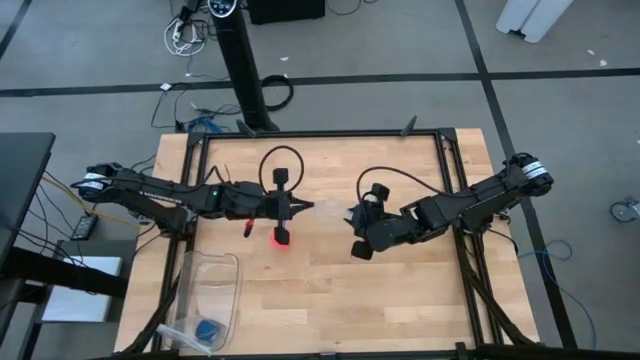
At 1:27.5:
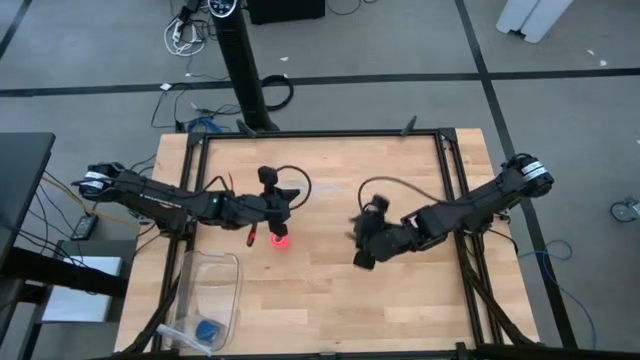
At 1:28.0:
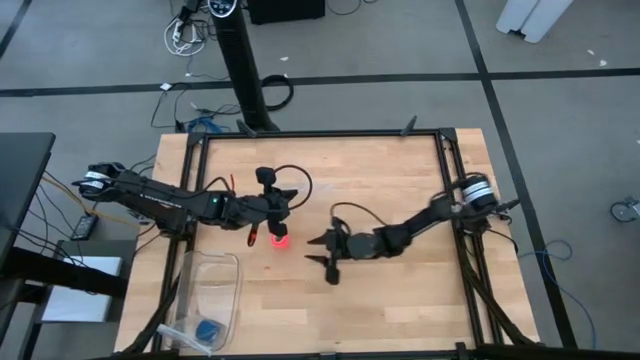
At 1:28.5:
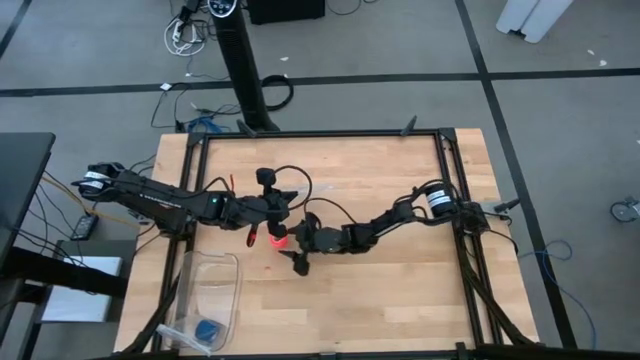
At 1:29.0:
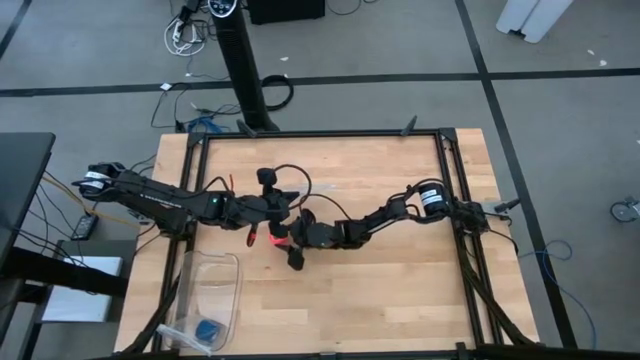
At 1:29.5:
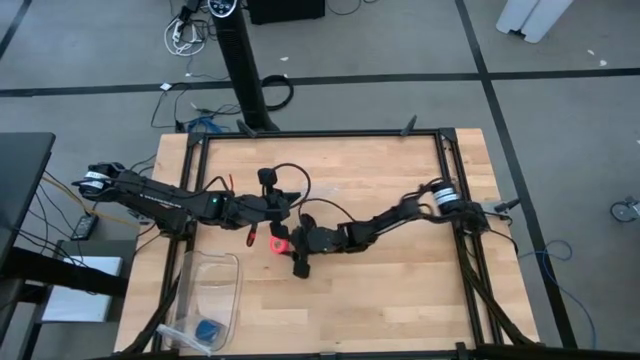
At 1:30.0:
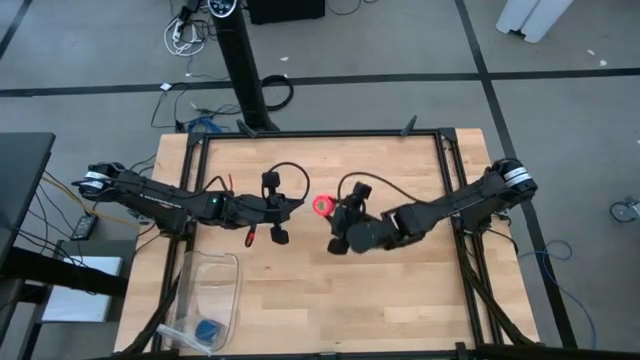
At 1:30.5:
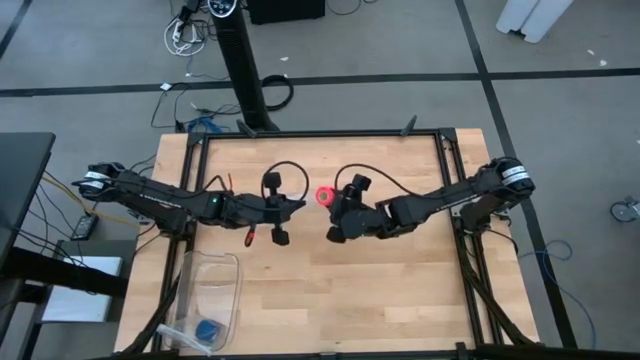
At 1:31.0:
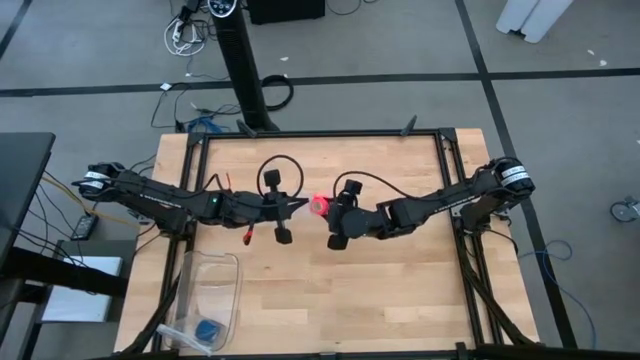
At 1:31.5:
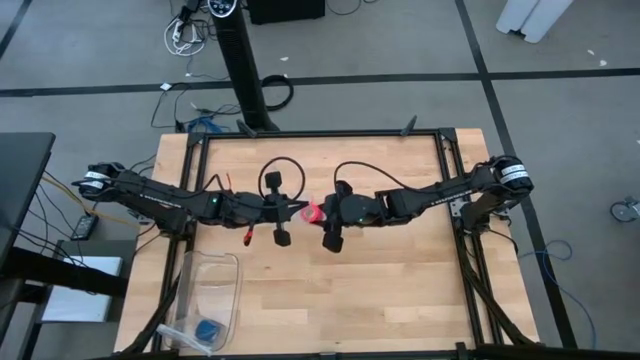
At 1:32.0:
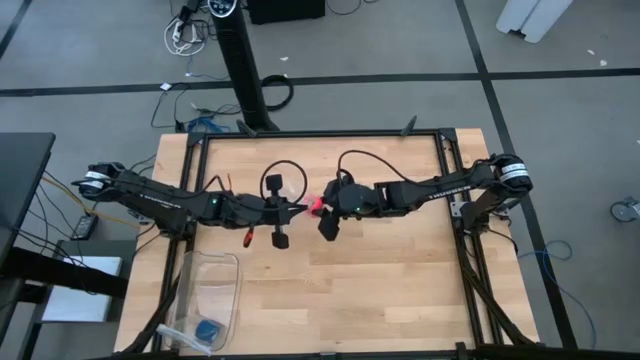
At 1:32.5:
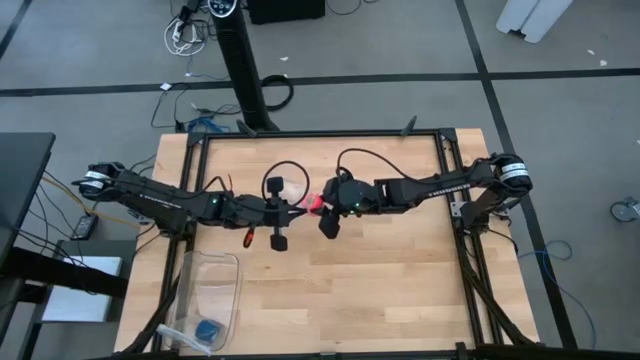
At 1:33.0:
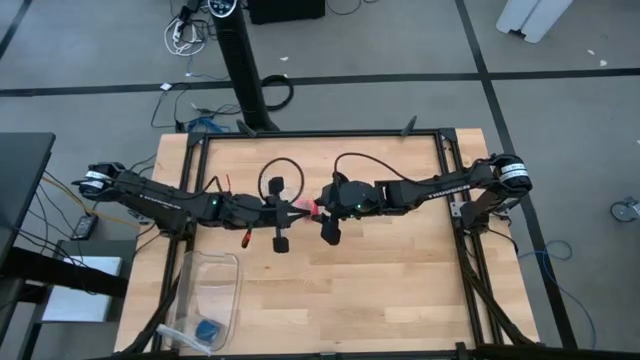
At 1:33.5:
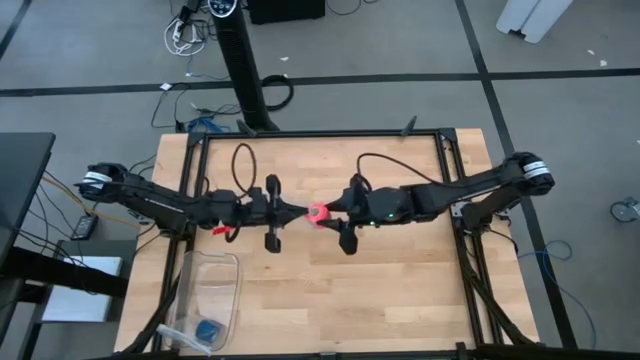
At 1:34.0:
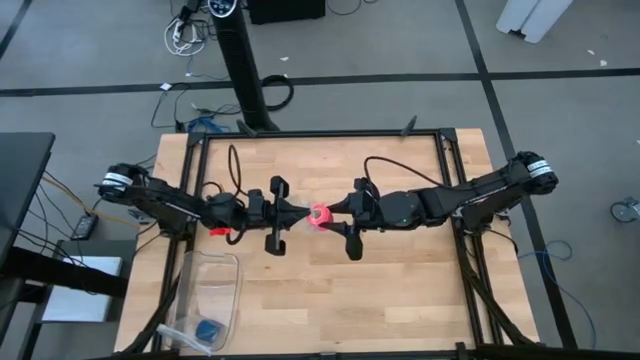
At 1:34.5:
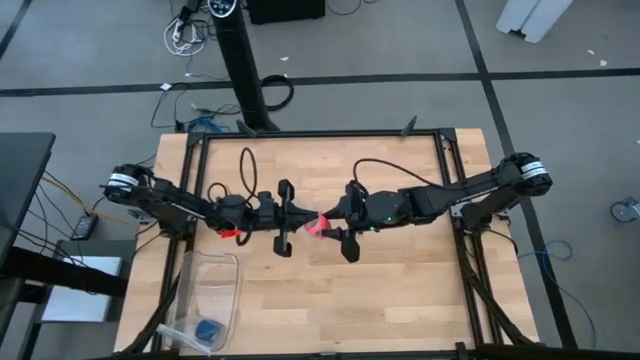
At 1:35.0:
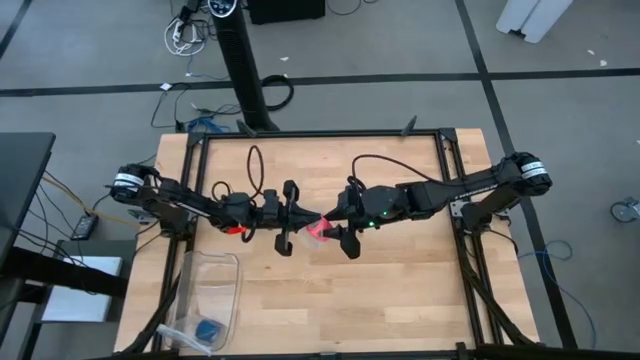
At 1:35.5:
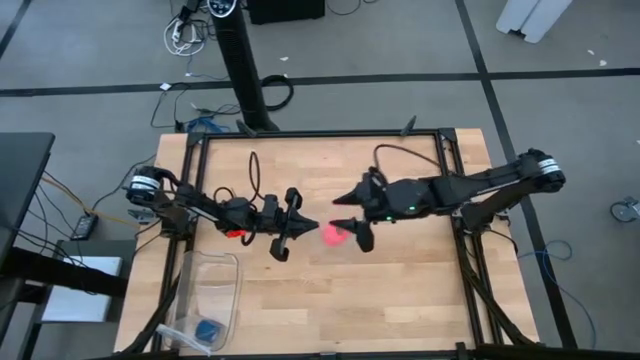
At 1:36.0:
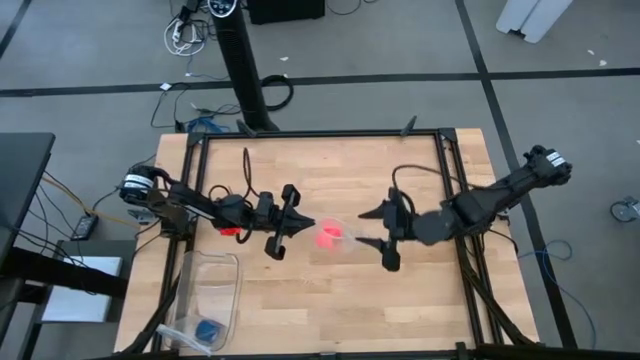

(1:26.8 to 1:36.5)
Task: Roll bandage
Put the rolled pink bandage into the zip lock bag

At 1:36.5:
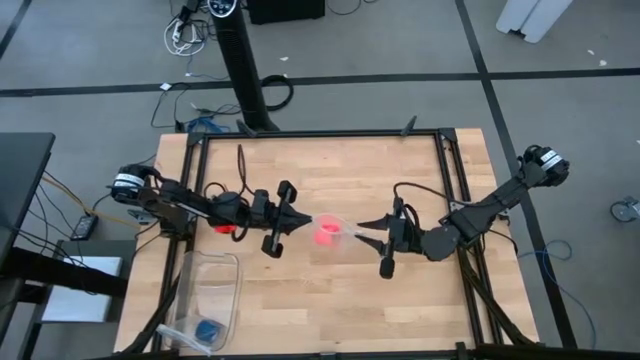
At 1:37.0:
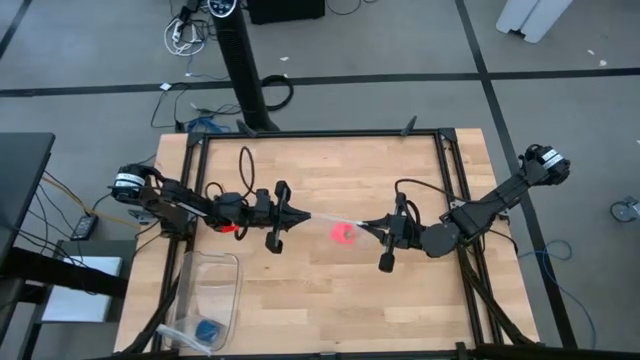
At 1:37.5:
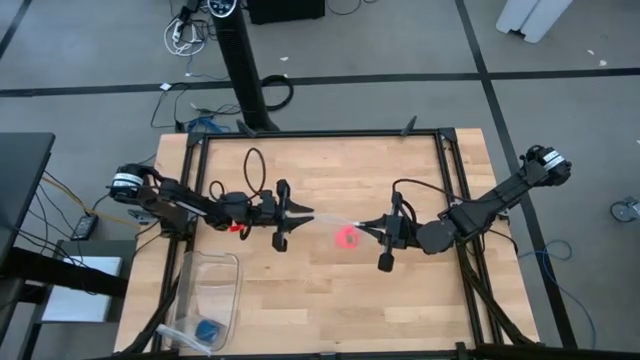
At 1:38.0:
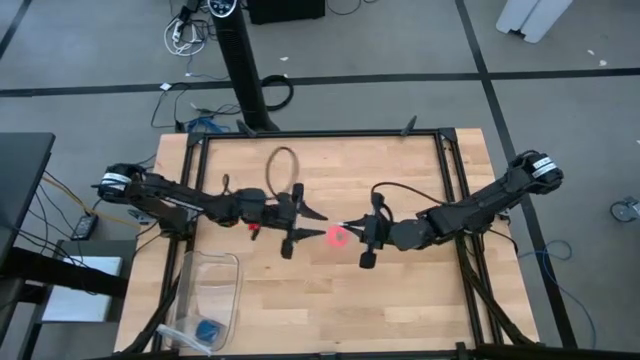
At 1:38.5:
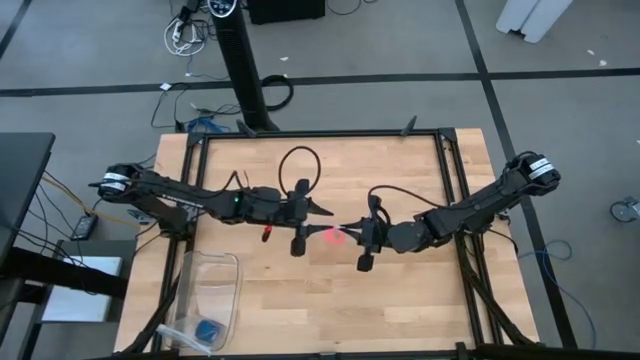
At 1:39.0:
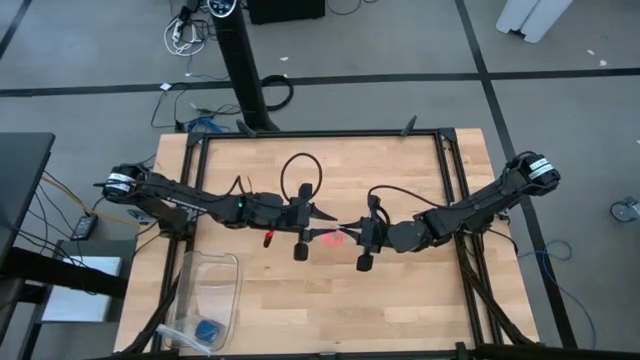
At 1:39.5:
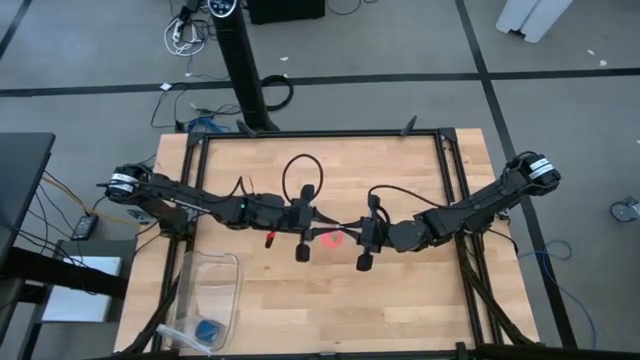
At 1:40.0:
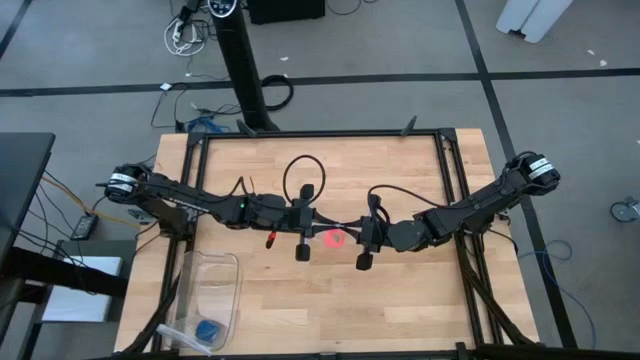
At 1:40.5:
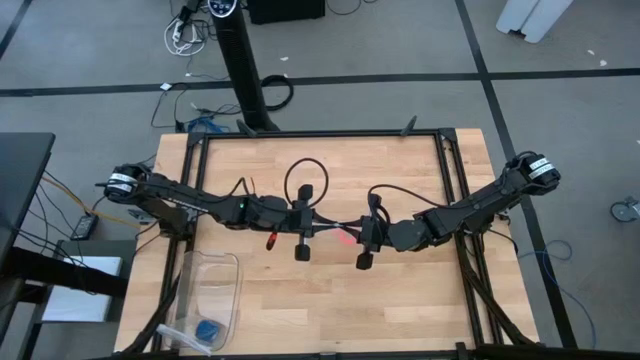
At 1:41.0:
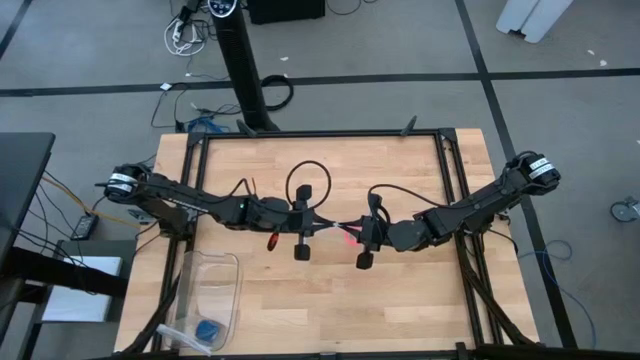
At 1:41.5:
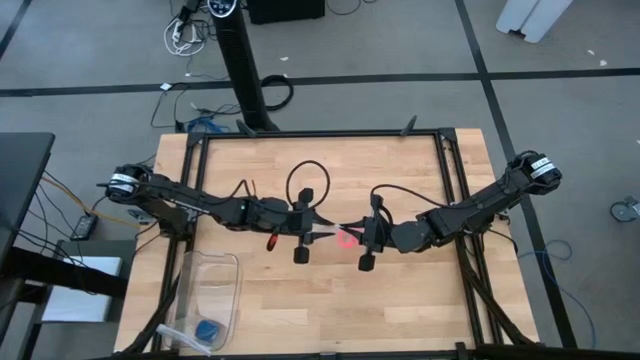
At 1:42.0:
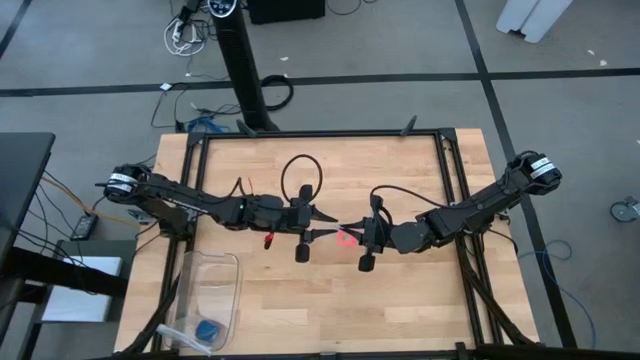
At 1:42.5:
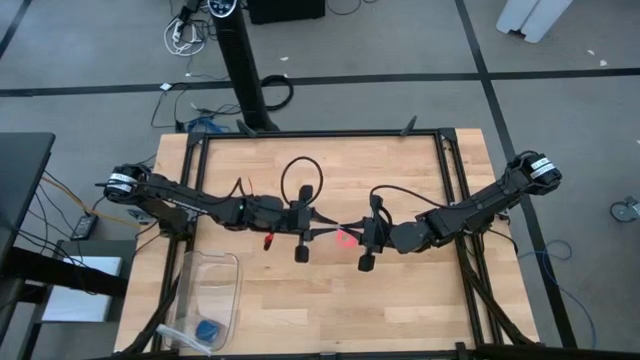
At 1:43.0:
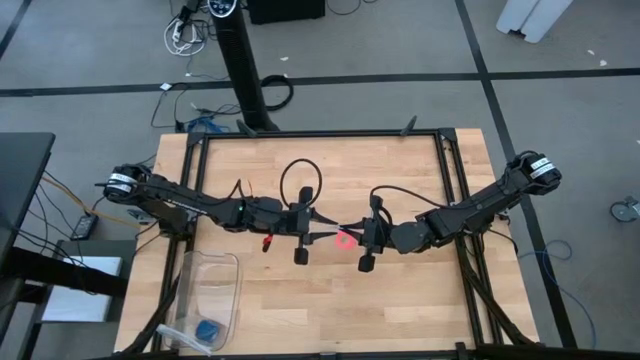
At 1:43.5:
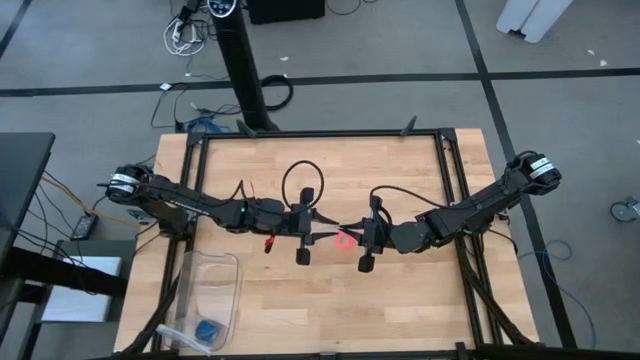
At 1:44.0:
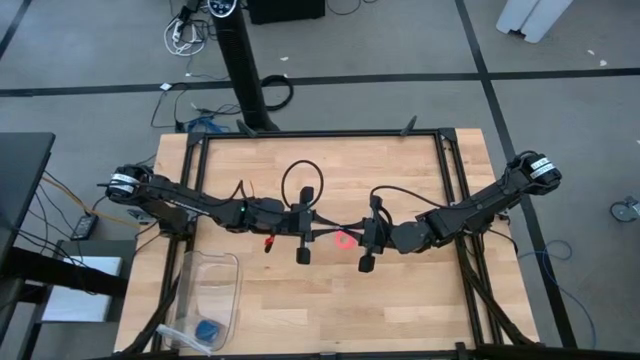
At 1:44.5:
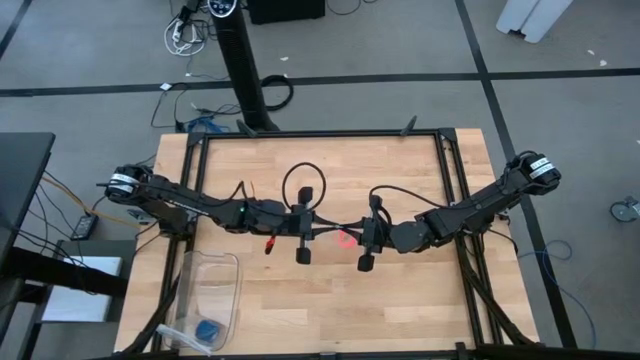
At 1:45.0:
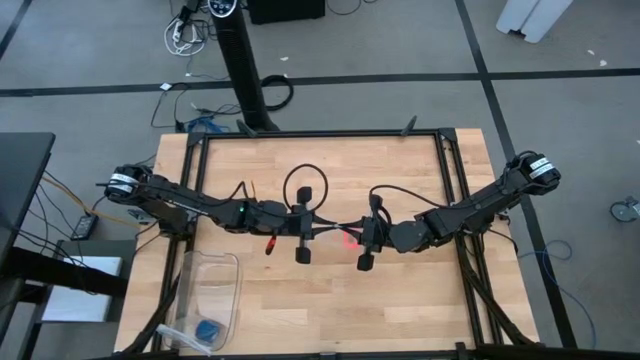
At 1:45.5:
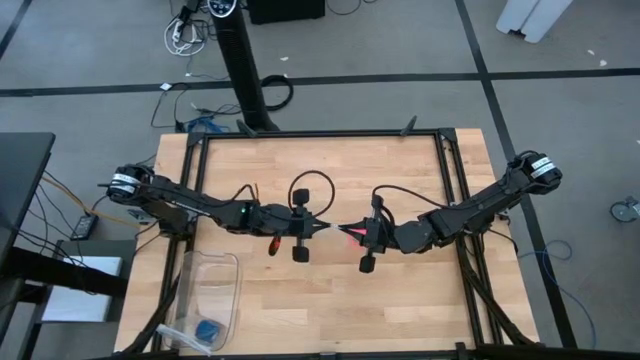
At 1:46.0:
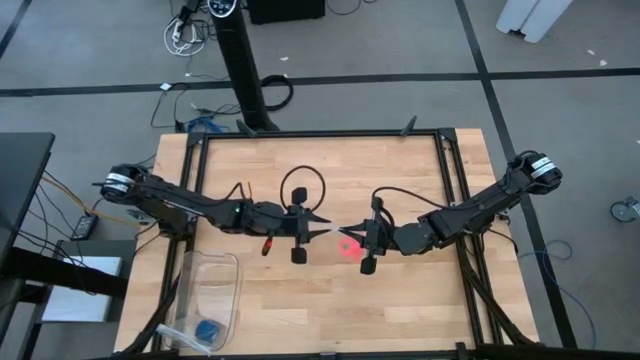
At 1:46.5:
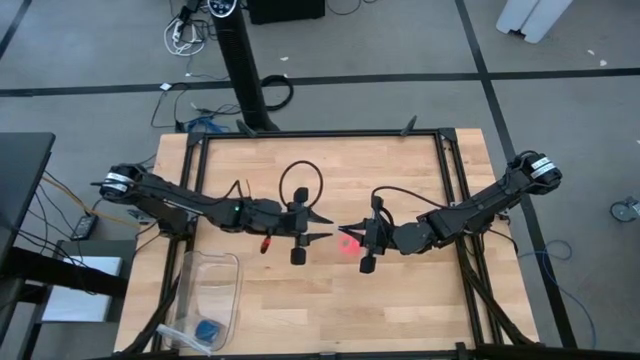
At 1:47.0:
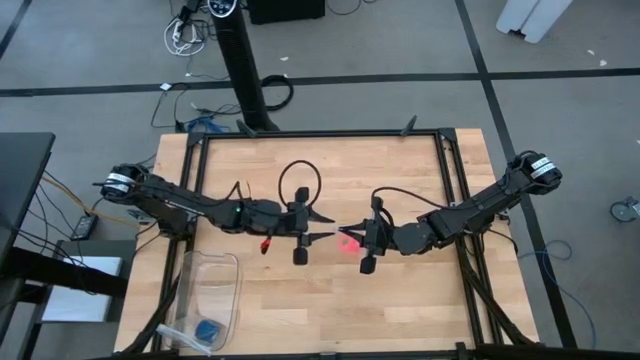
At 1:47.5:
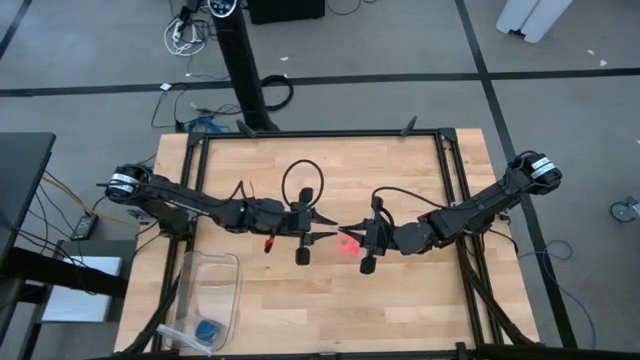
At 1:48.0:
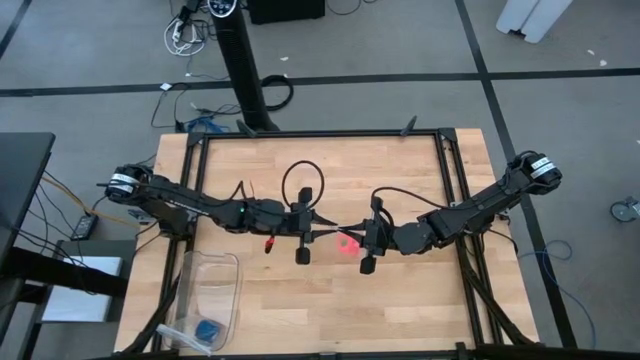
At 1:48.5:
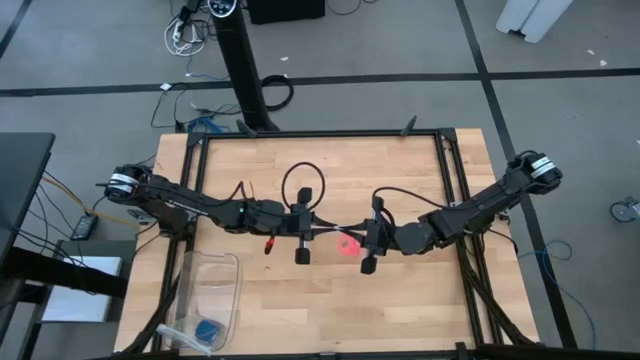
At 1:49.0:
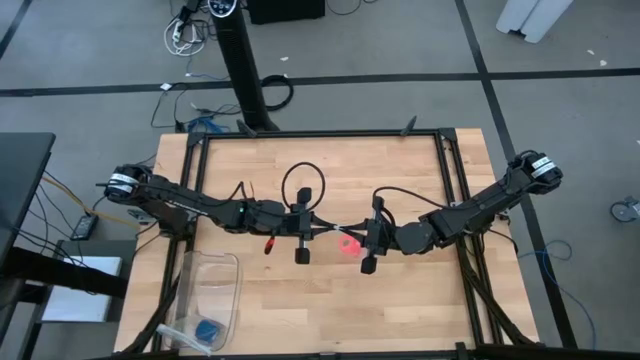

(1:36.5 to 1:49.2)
Close the zip lock bag
